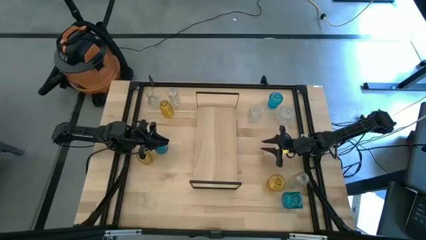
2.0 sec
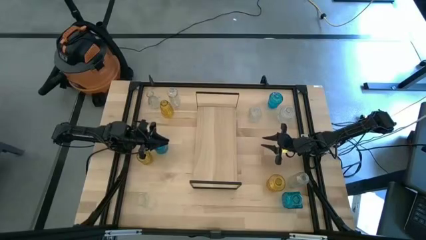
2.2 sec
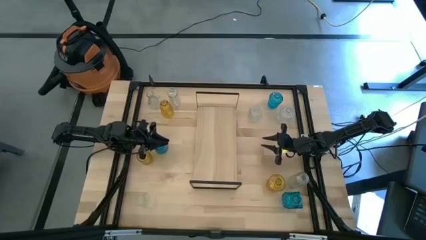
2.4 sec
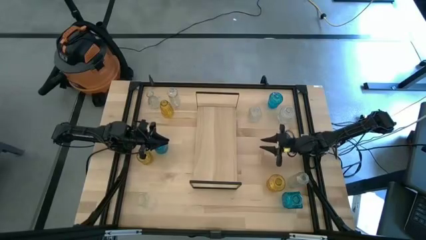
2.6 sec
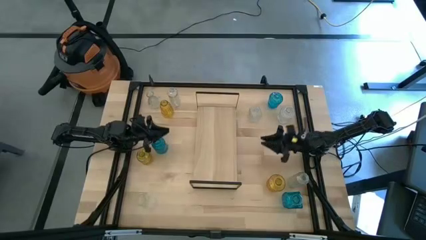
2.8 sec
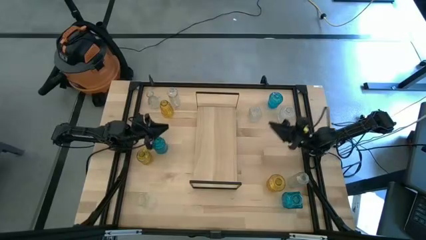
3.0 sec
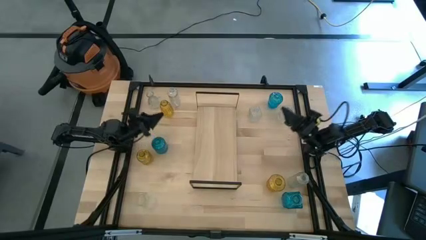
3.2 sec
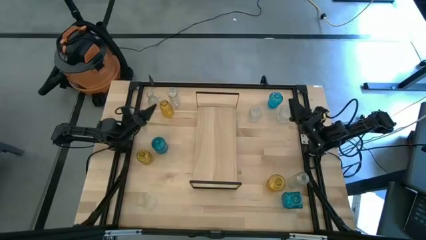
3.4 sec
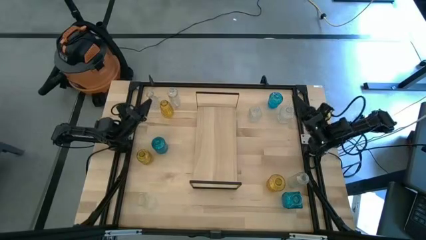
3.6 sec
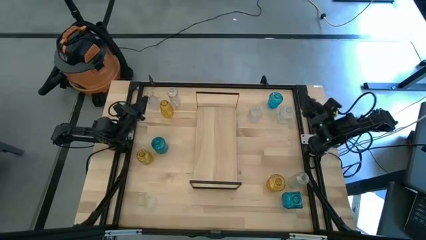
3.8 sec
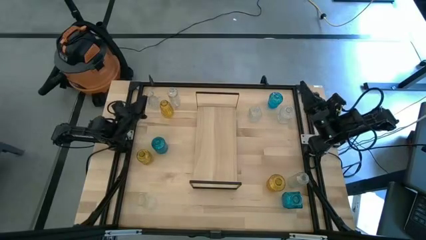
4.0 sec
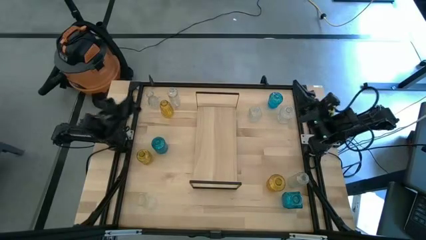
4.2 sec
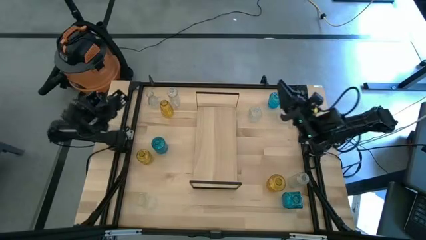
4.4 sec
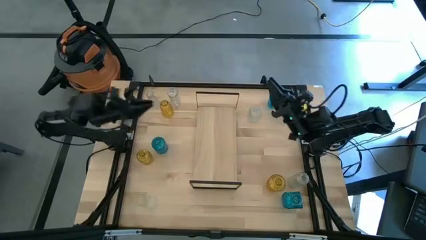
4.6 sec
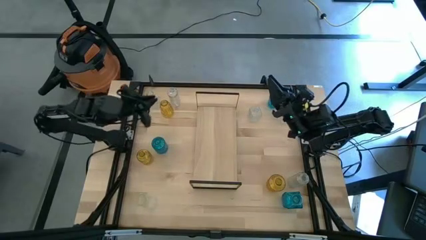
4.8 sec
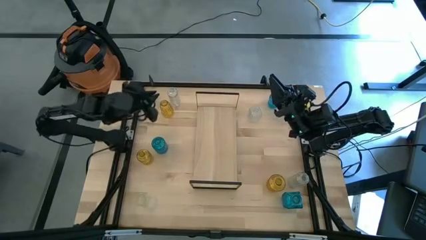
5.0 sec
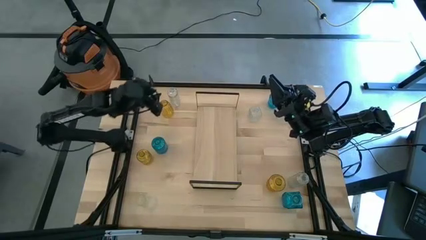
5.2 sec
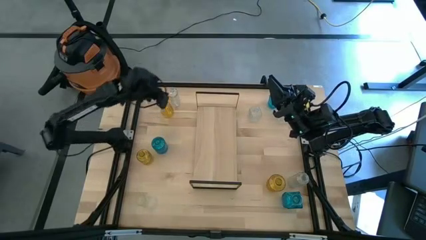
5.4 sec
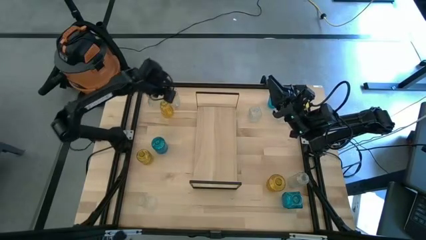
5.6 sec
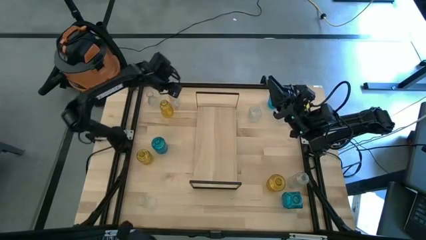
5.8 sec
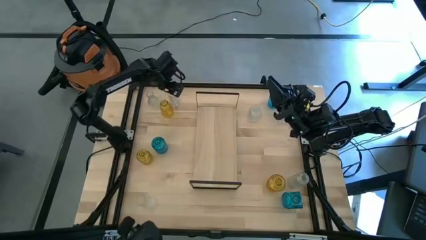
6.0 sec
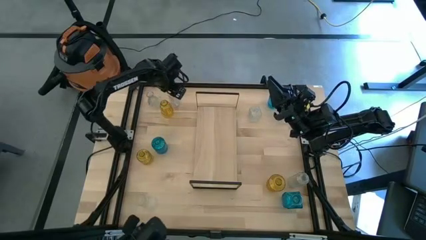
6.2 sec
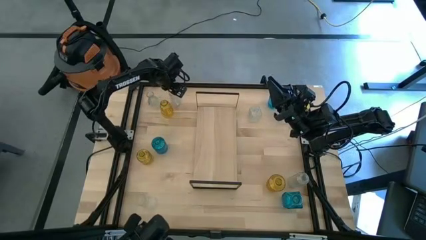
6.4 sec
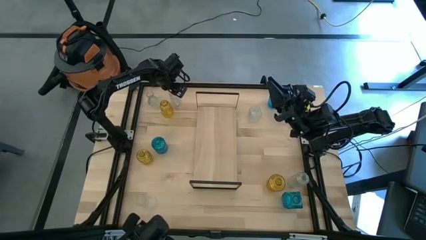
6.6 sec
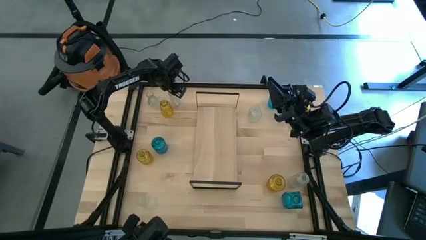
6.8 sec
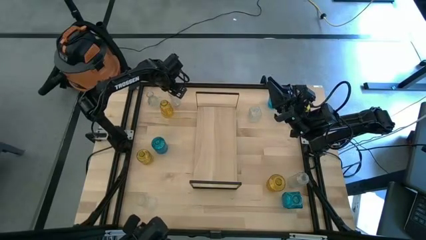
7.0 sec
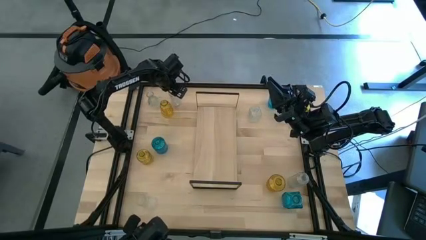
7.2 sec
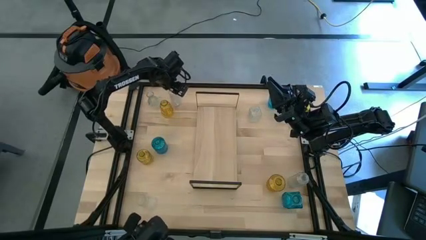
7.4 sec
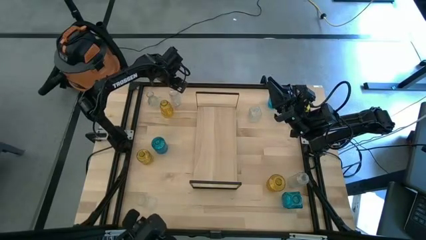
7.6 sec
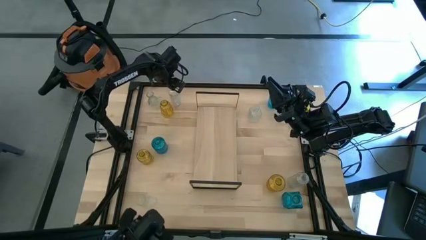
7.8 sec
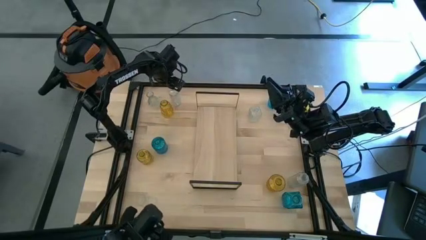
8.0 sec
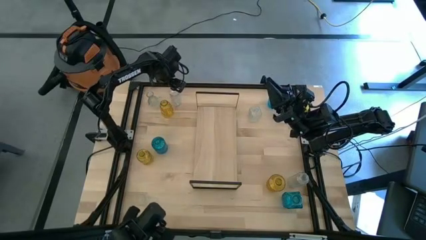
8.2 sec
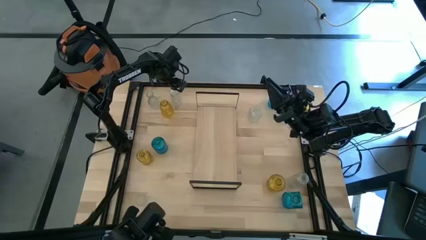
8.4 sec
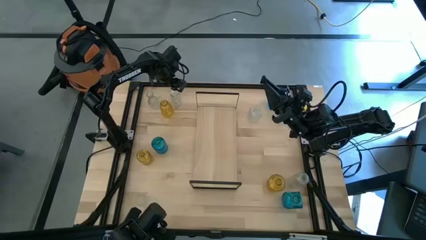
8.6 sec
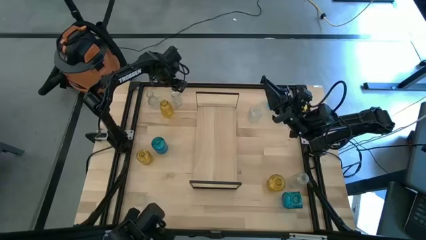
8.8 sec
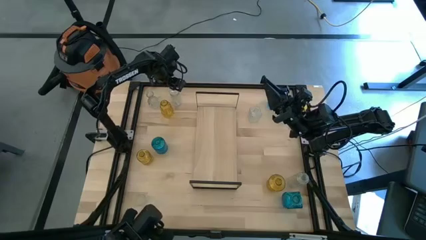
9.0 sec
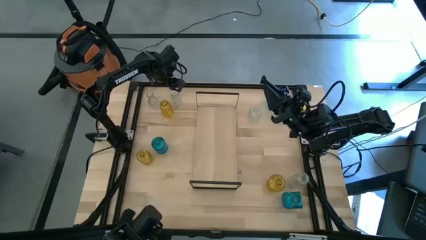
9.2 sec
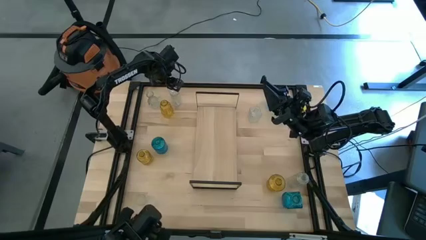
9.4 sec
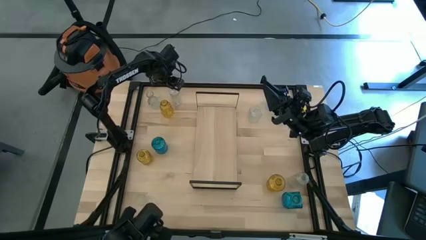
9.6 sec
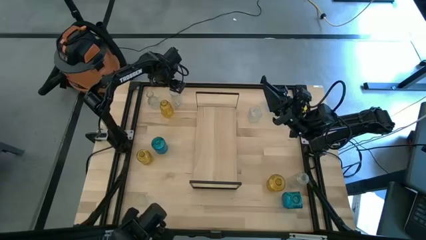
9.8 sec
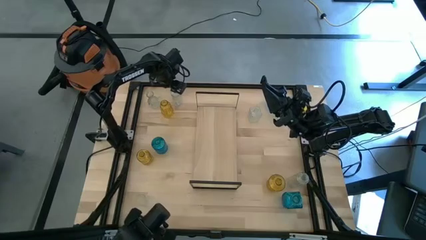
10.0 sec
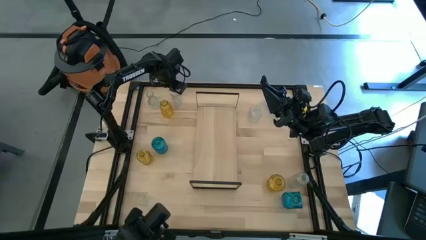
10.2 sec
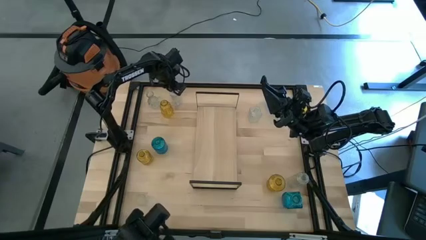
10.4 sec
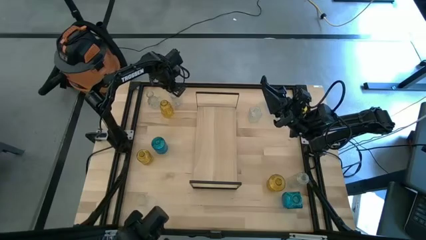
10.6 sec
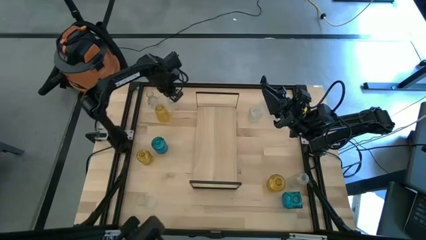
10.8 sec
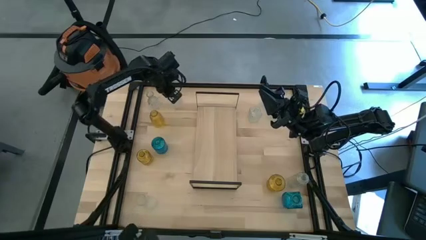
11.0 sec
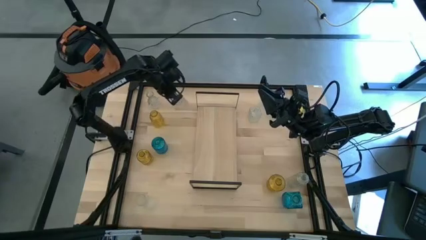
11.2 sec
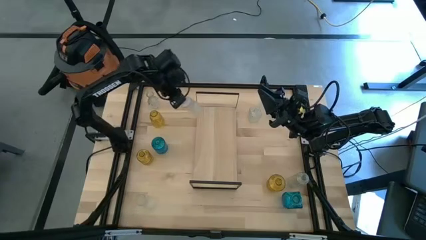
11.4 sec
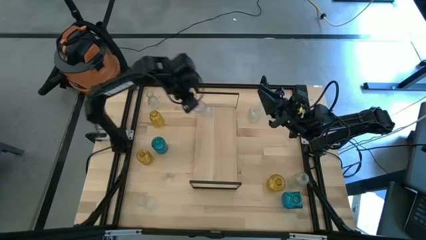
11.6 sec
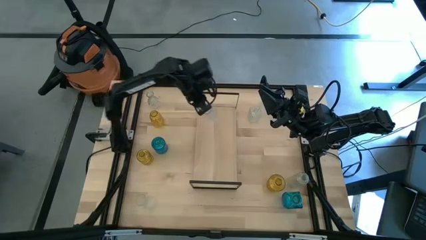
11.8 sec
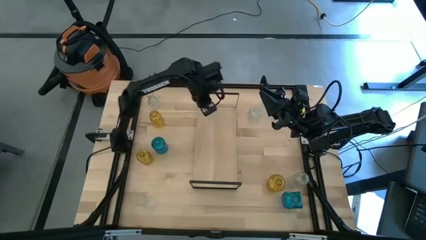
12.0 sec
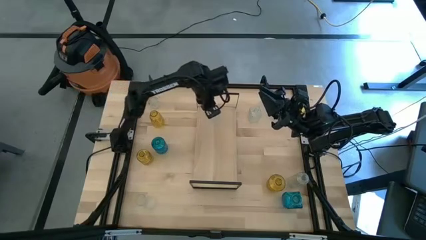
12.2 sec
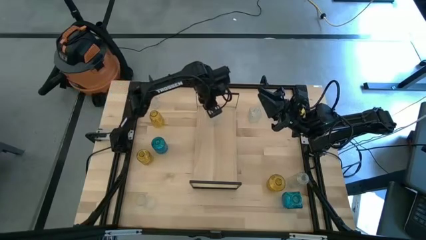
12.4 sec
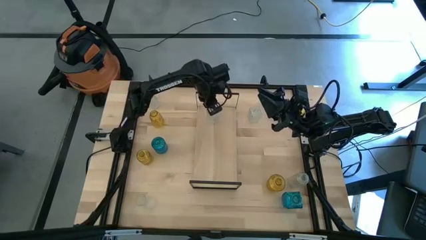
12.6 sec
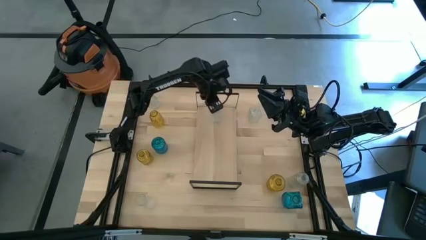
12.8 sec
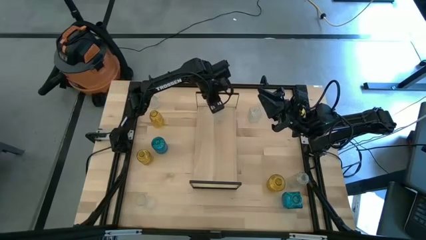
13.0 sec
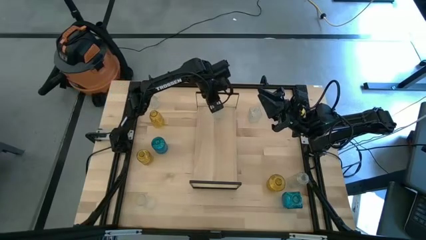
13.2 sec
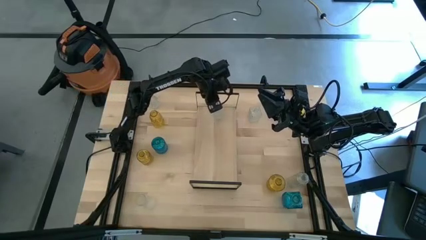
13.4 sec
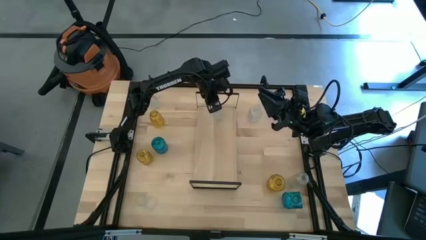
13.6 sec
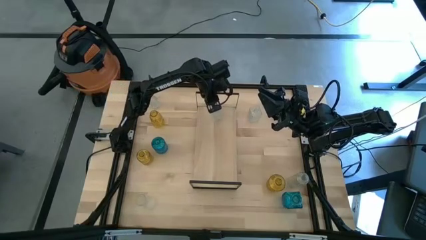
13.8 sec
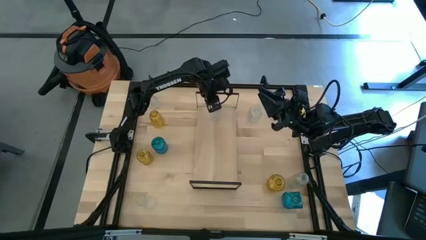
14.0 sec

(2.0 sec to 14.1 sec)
Task: sort vases onto shelf
Put the transparent vase on the shelf
